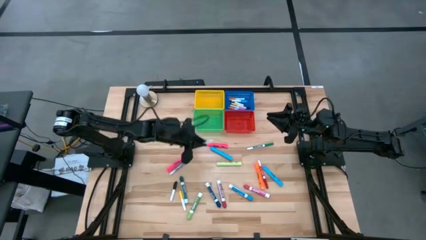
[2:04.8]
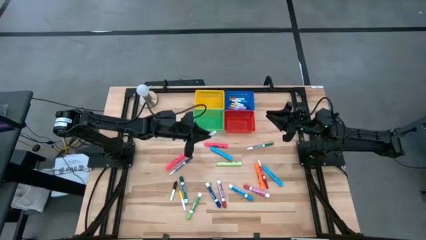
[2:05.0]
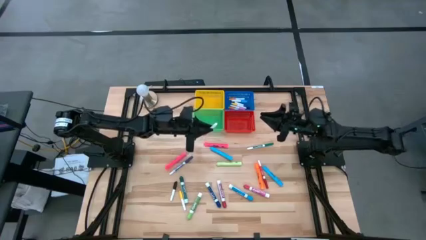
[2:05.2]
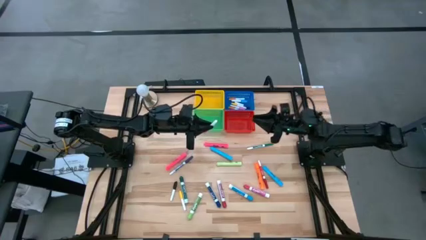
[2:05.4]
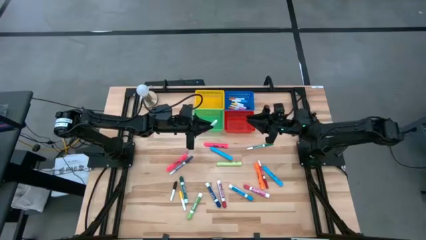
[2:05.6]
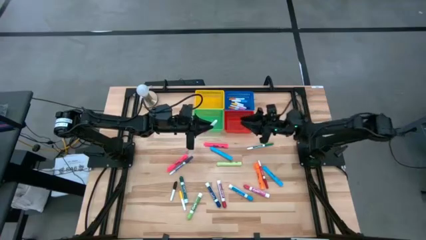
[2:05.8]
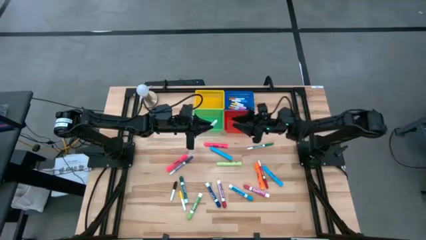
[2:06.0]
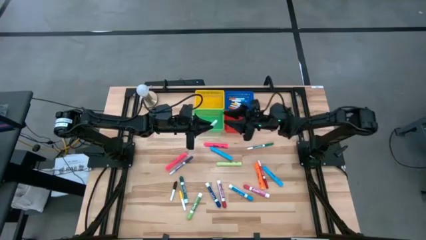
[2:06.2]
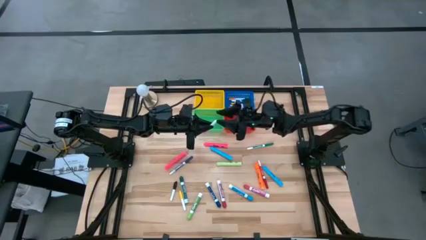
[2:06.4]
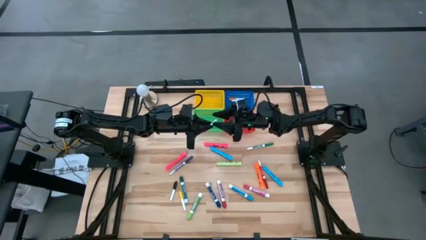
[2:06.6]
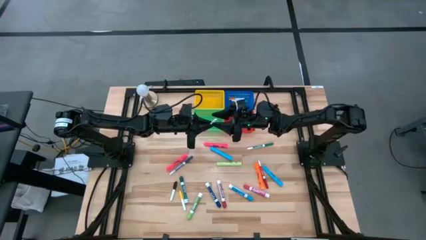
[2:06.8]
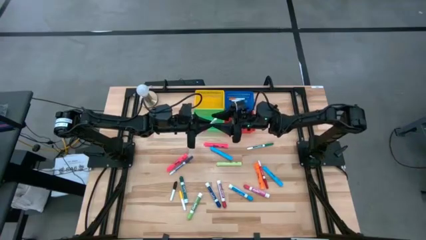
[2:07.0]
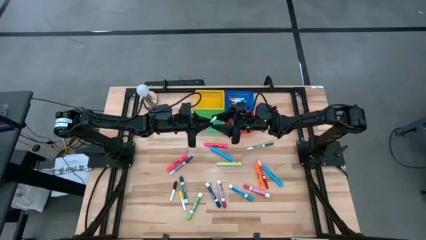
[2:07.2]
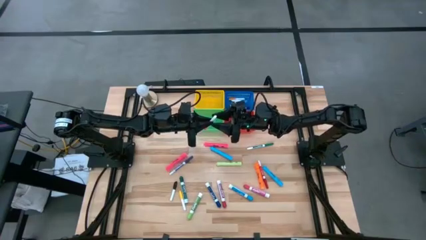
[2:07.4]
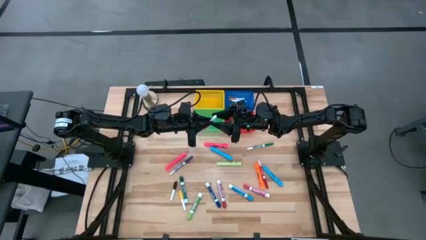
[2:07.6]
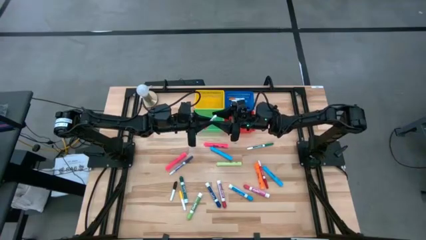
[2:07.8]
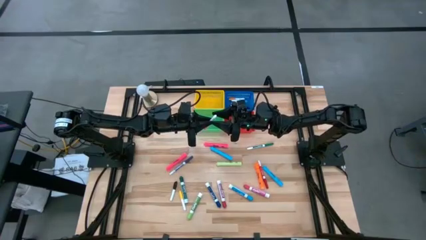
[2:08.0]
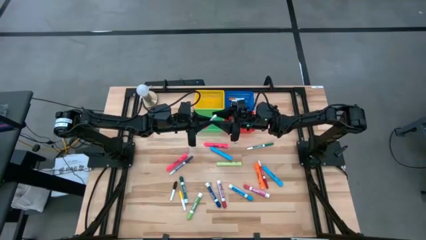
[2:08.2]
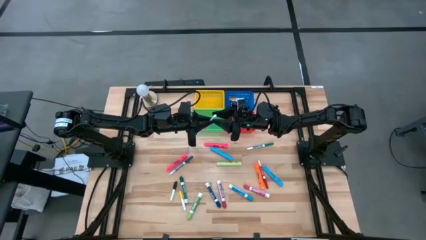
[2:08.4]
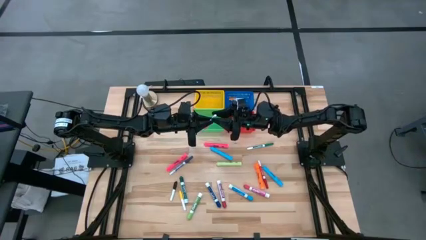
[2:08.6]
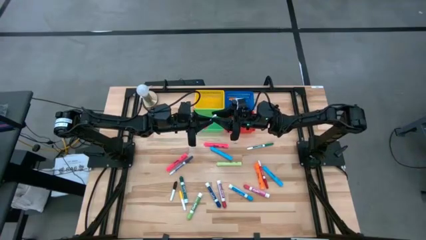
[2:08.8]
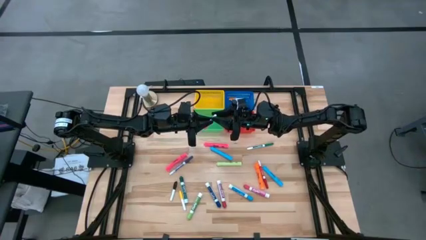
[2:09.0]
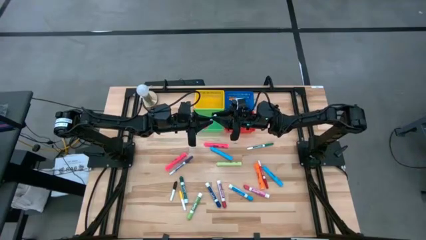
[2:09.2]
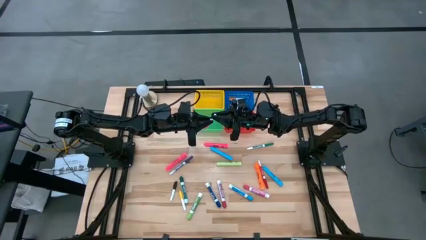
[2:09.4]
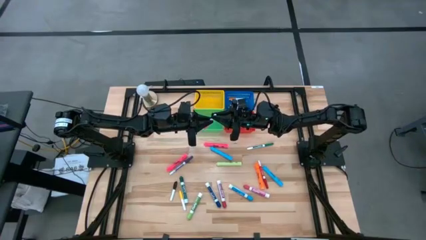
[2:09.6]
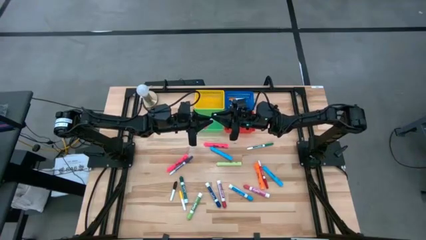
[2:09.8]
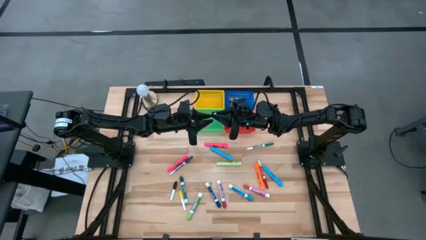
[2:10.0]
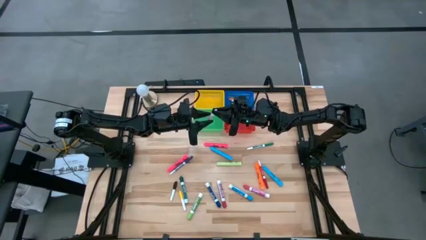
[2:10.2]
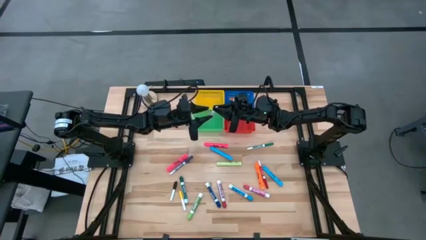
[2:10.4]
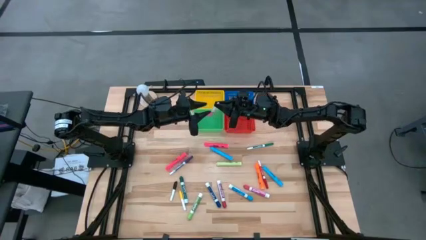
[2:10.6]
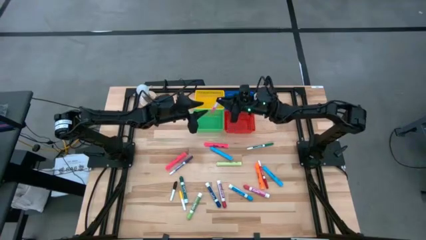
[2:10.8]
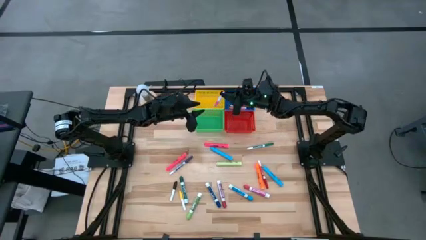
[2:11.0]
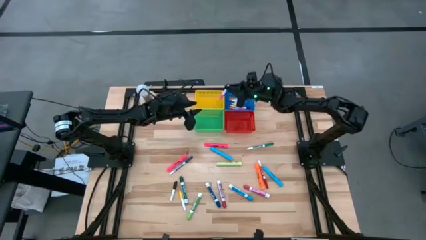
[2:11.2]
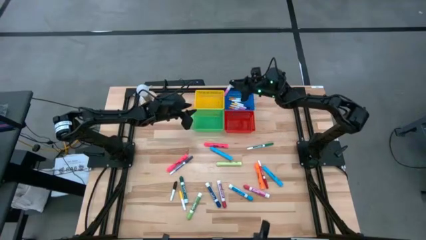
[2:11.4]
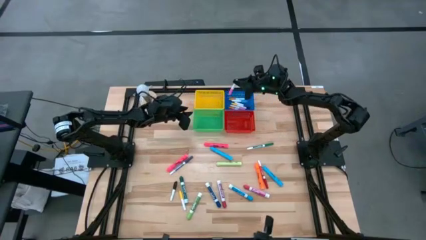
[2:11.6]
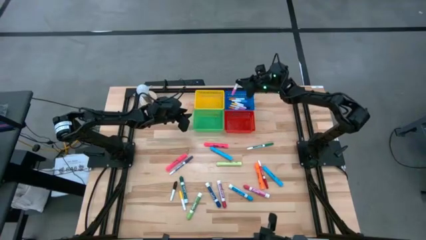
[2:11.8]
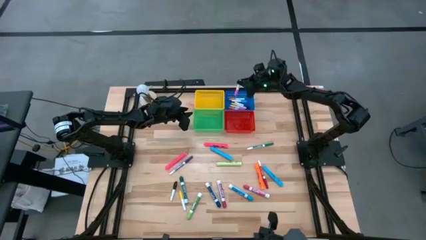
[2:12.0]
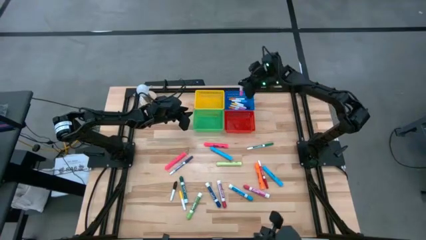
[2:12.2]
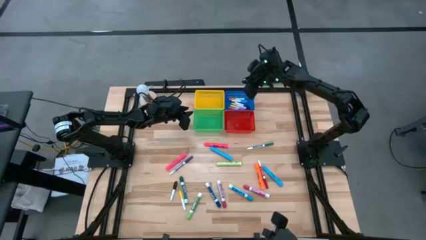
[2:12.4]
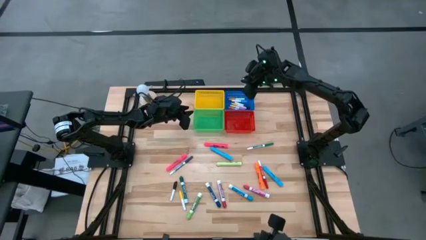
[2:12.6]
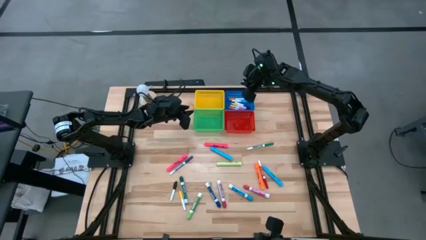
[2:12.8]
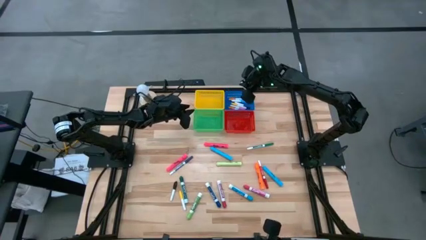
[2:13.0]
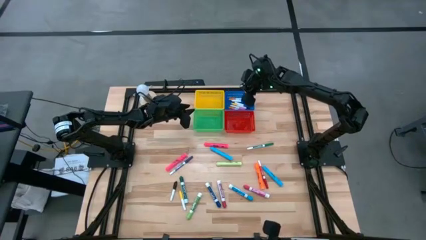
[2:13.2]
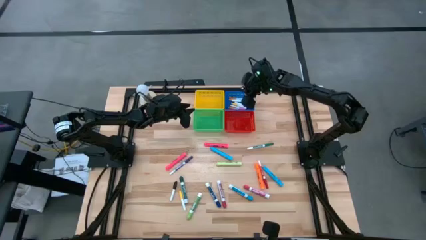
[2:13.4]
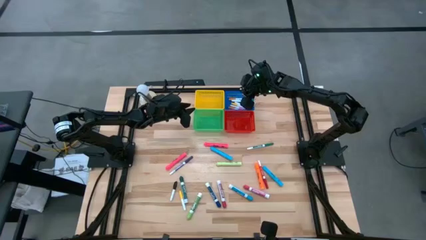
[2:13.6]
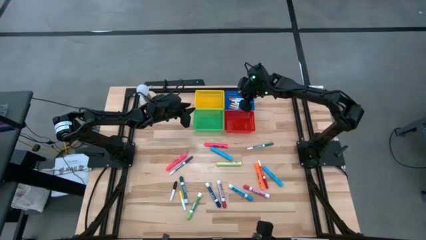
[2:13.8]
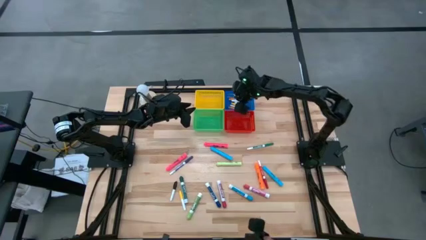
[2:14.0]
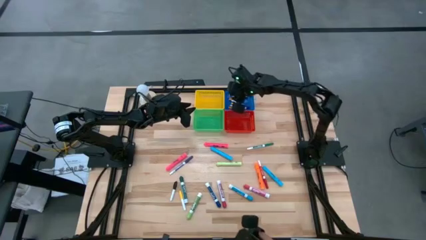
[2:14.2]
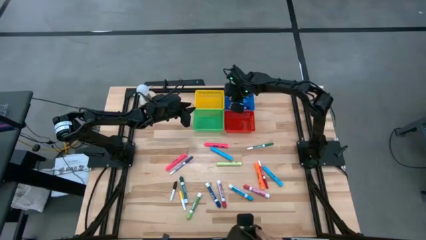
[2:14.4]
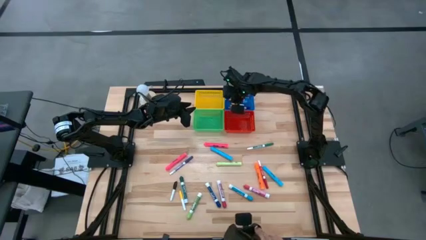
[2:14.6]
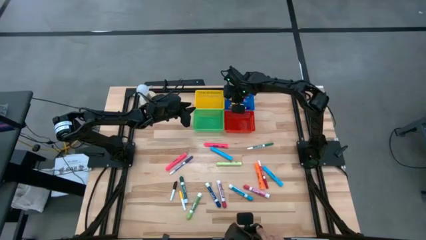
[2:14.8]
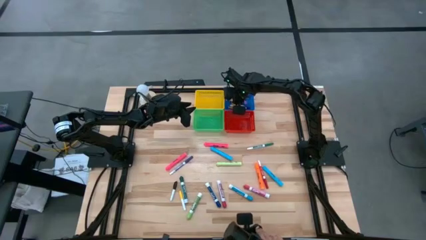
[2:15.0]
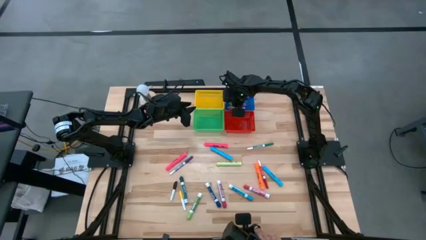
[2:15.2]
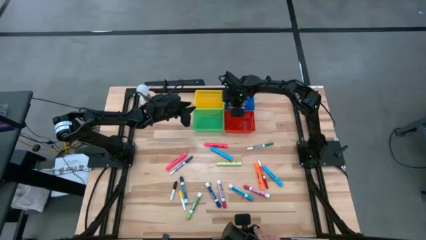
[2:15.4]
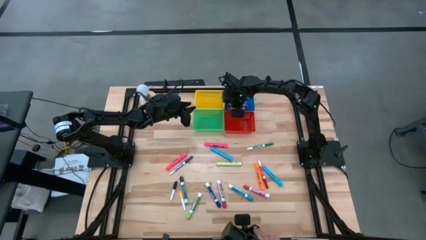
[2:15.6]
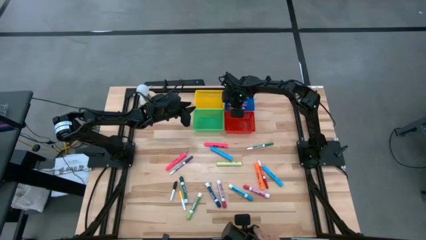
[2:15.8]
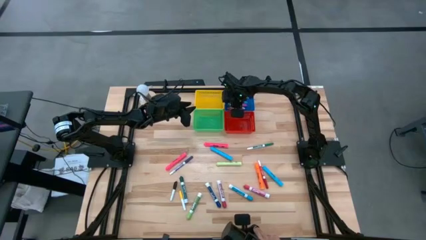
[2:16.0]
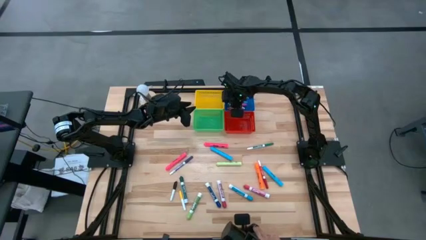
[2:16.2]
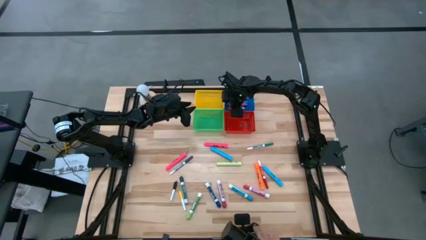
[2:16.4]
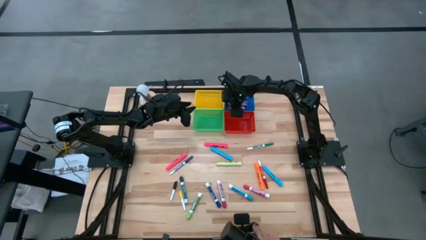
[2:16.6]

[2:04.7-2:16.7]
Task: Pick & Place Markers
Put the small pink highlighter pen into the blue bin
